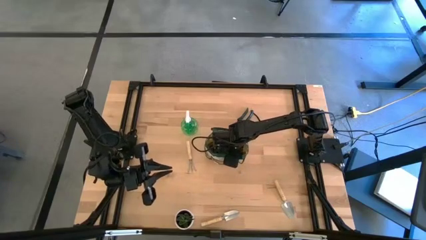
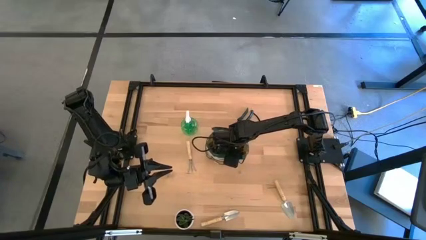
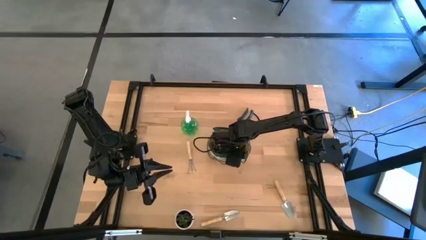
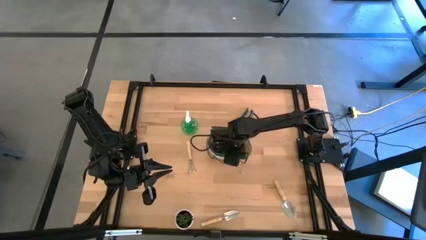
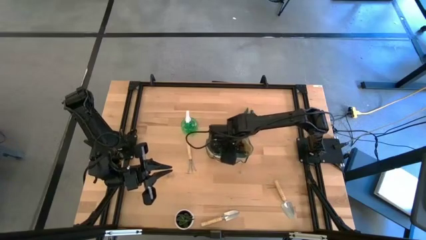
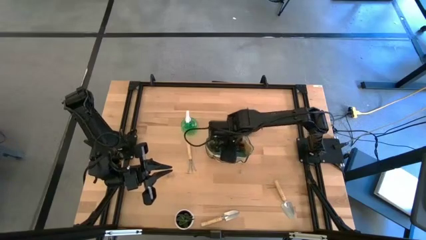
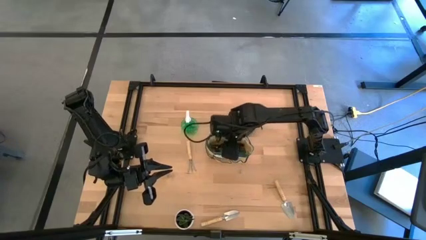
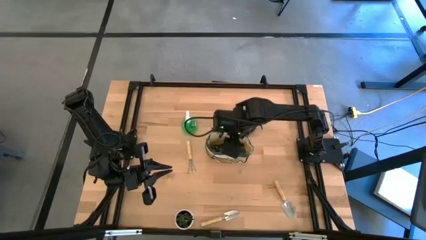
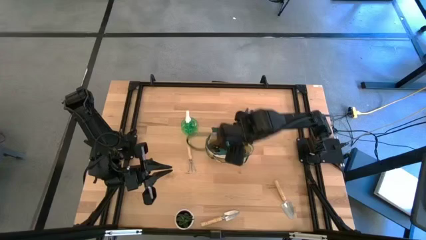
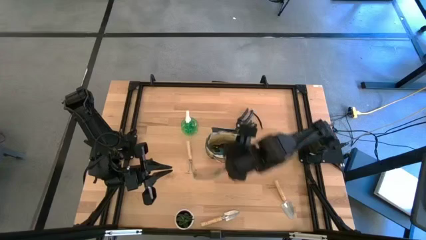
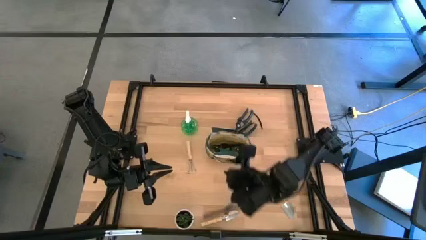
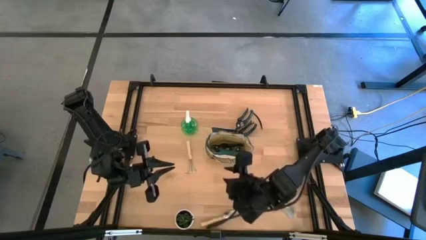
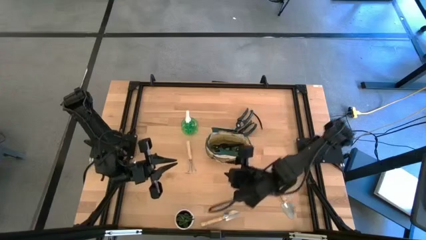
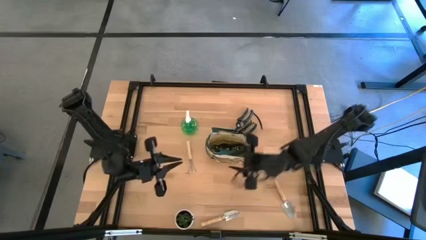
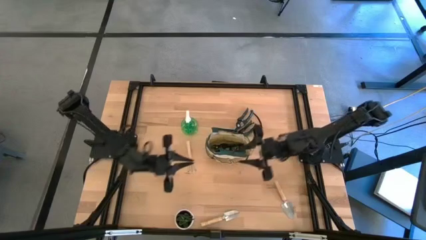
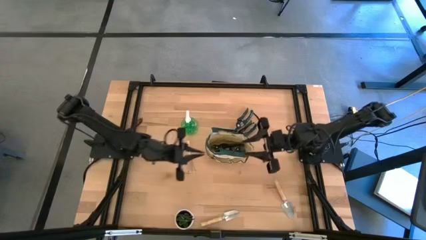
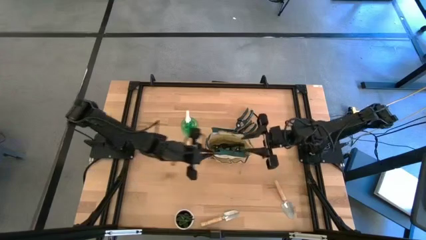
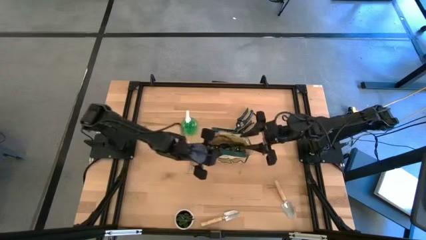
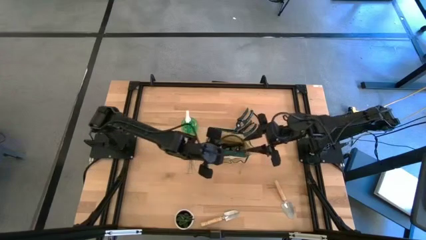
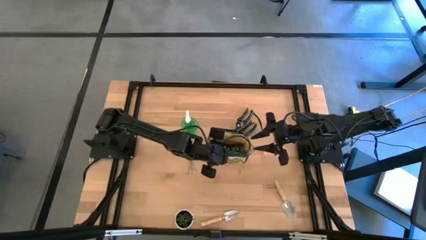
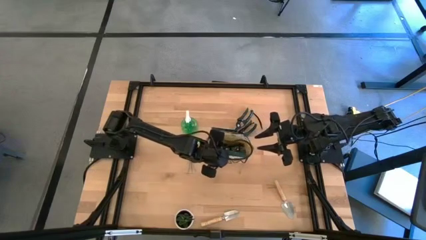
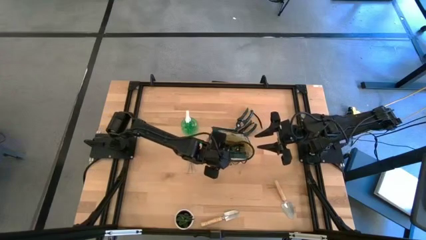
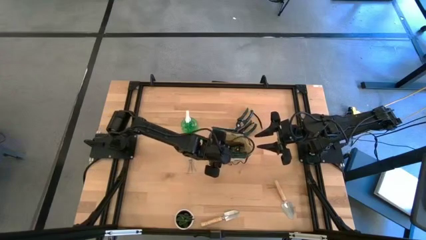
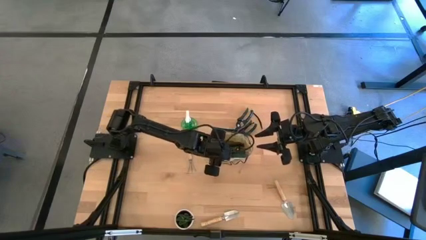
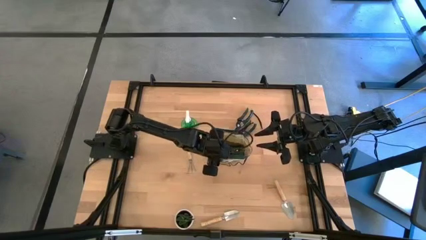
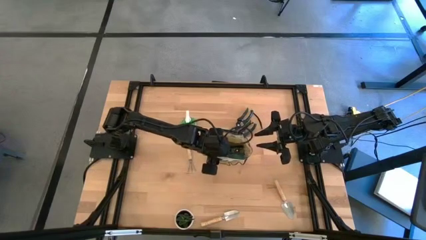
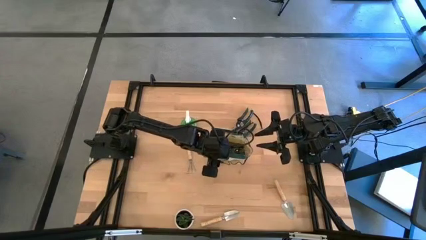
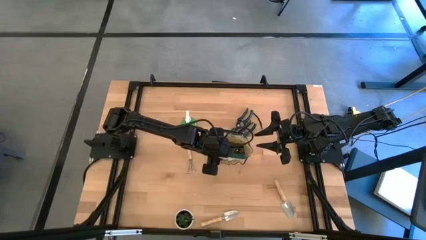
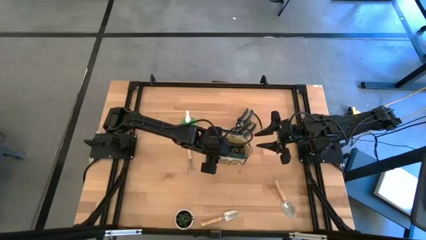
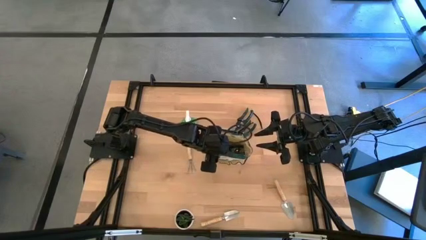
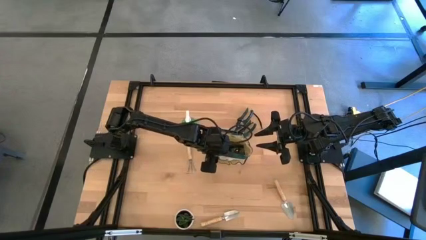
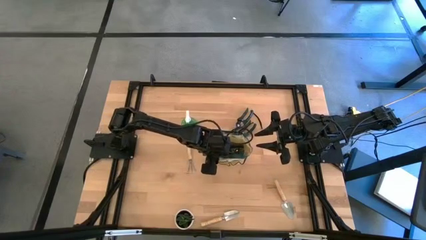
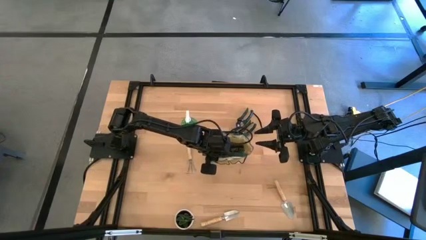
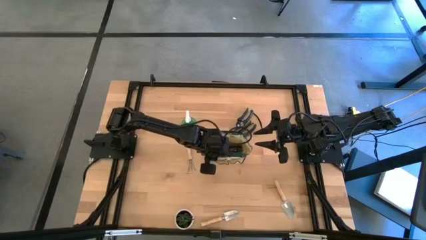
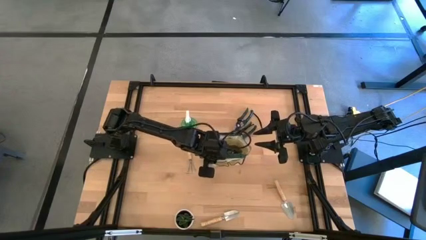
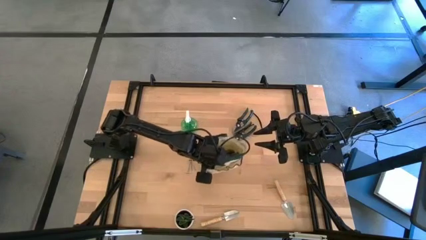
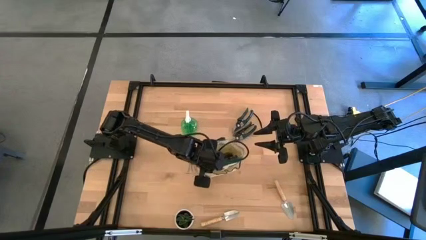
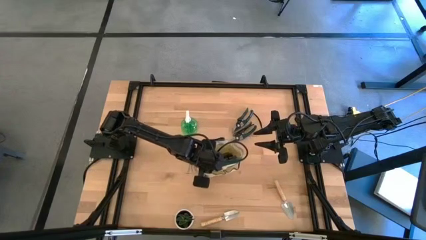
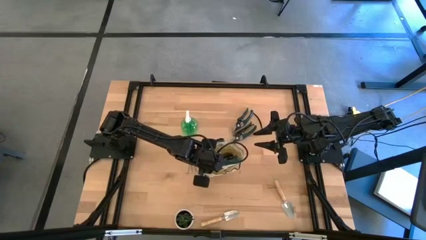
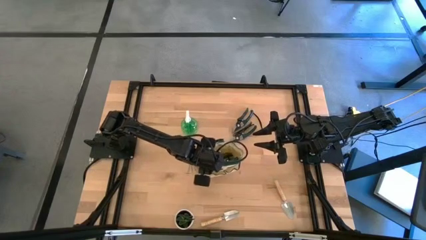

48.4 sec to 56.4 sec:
Task: Pick & Place Garden tools in Gardening bag
Adjust the green gardening bag

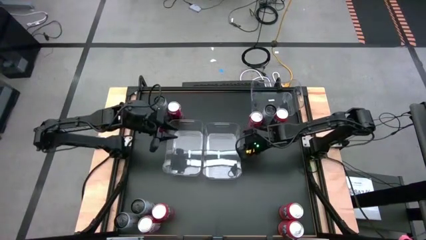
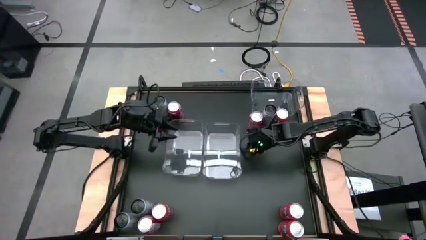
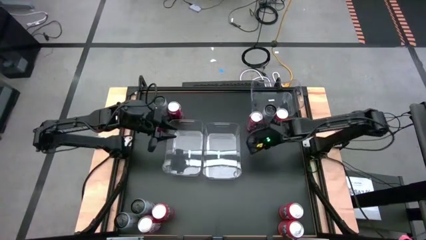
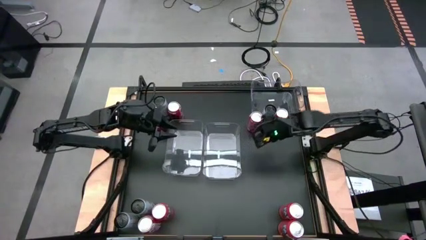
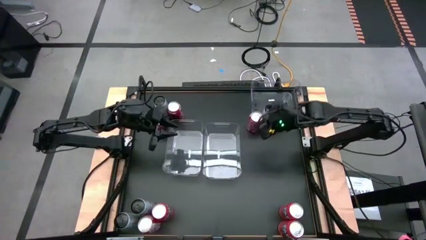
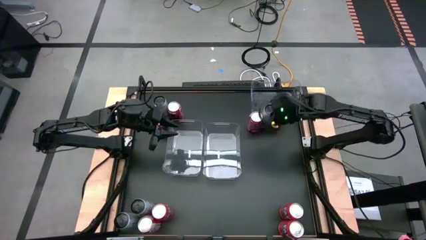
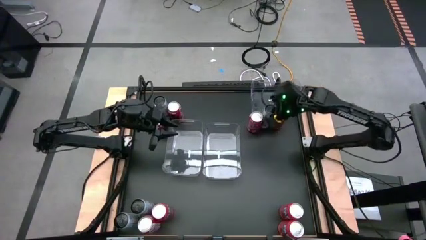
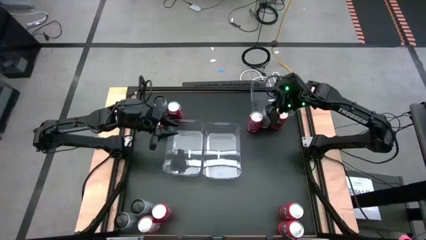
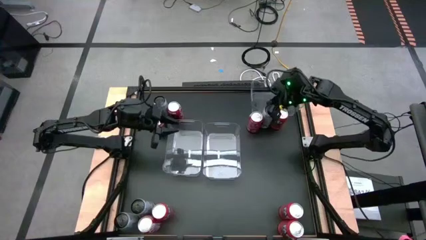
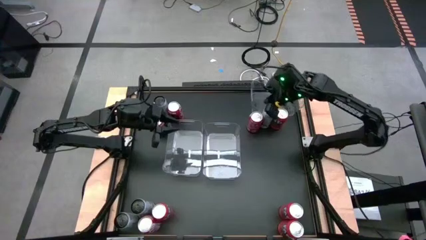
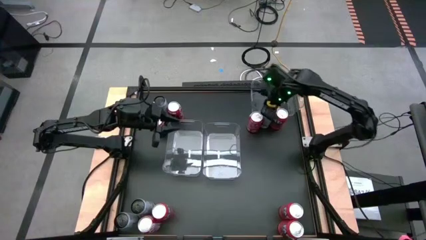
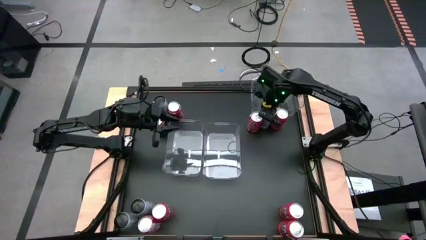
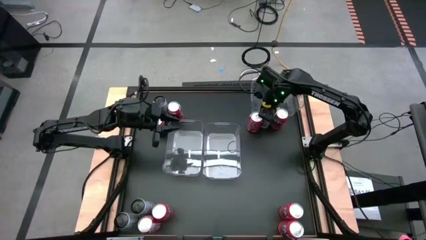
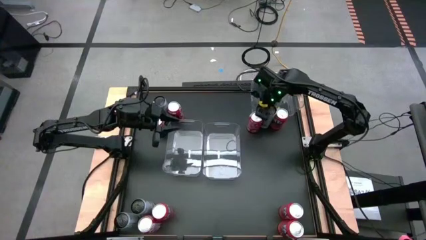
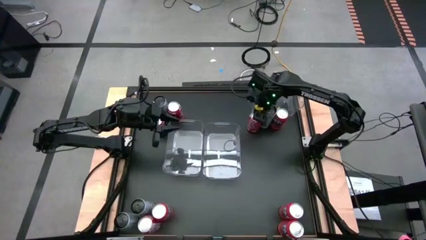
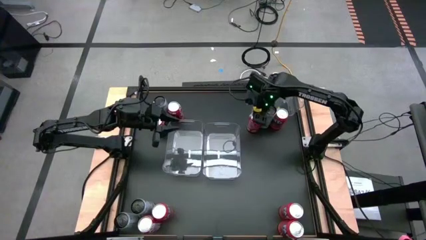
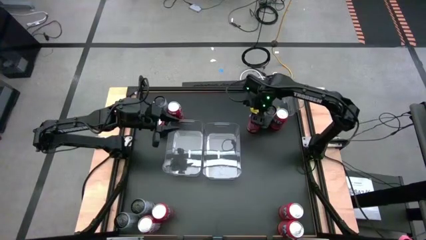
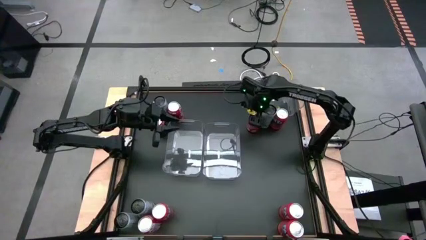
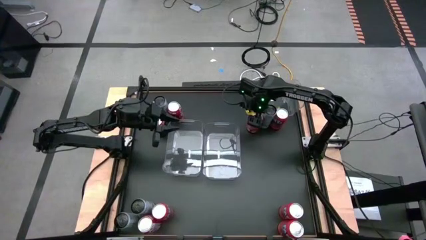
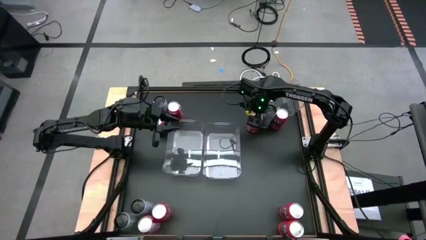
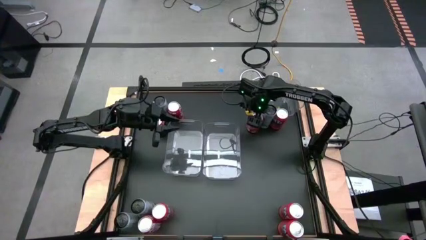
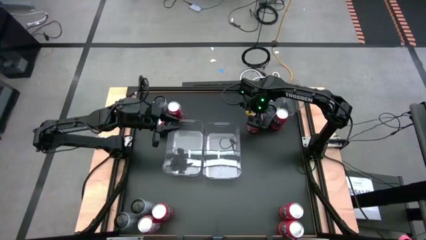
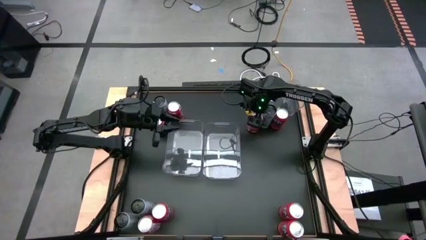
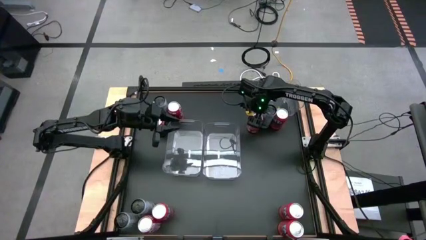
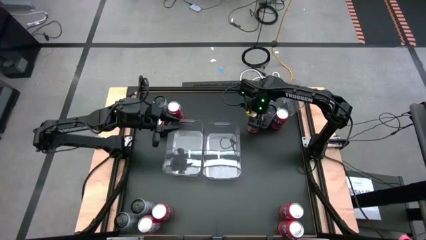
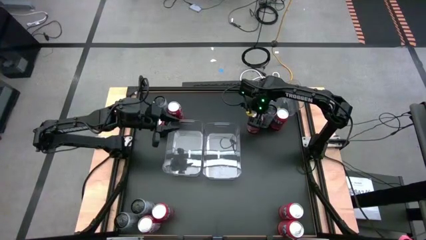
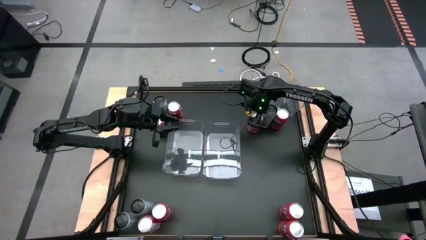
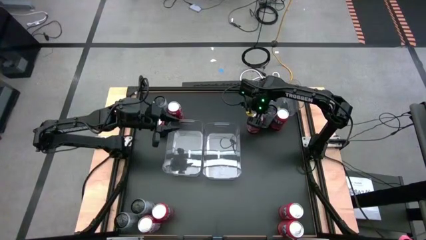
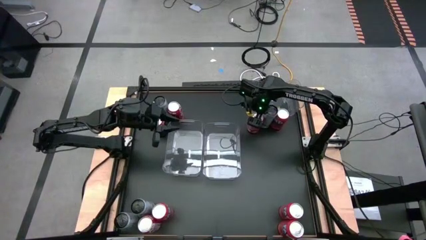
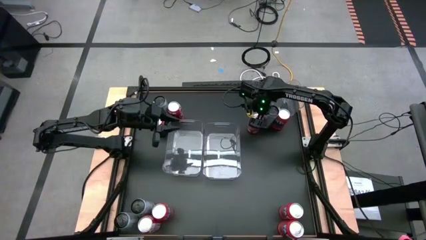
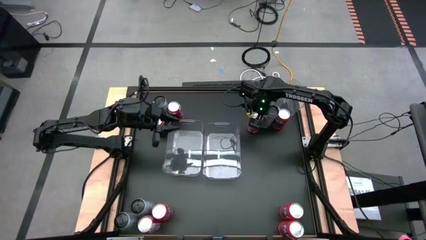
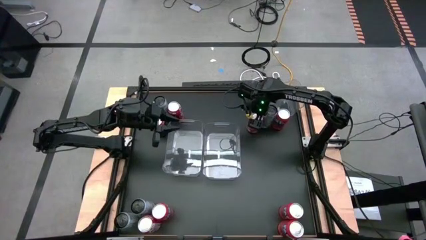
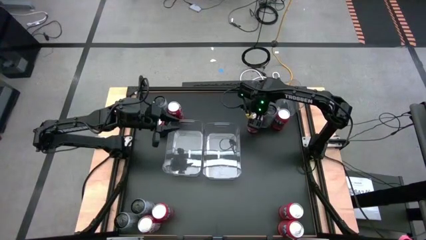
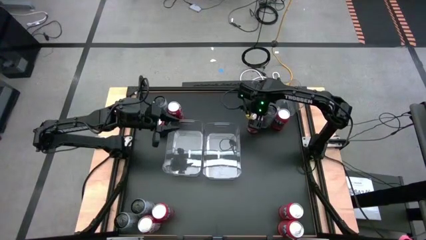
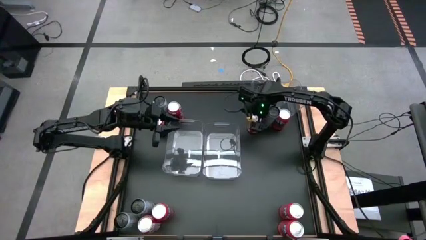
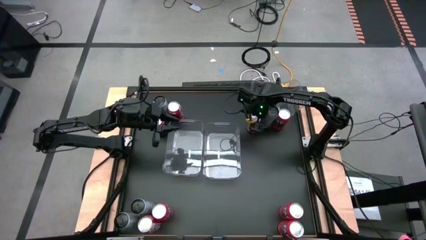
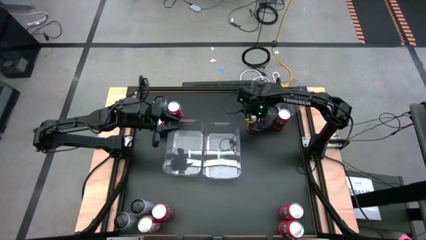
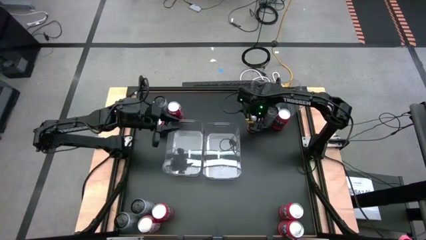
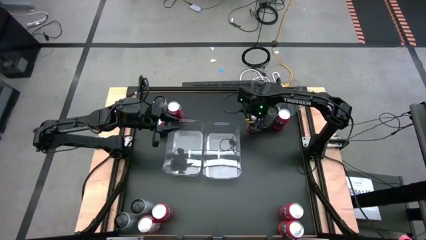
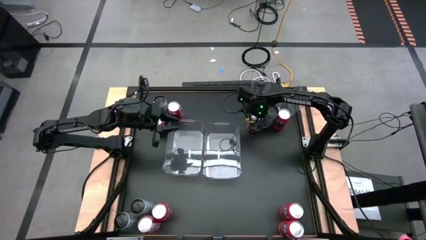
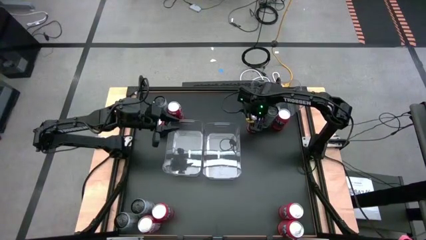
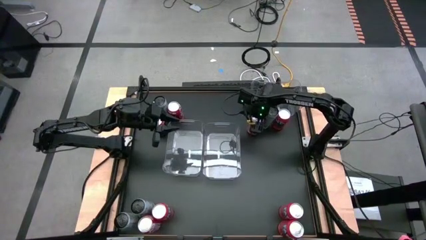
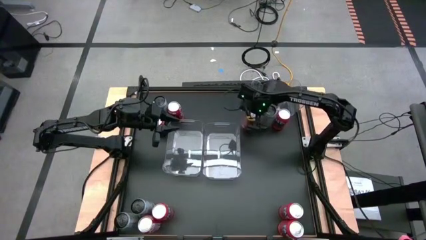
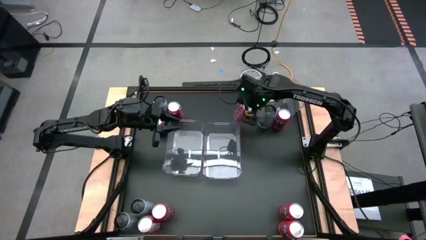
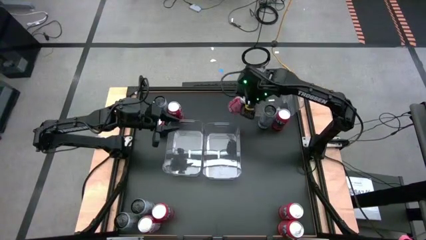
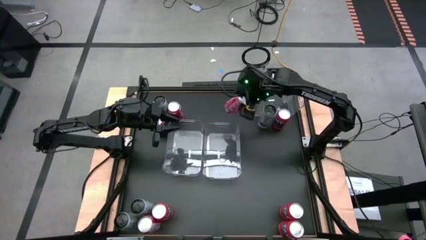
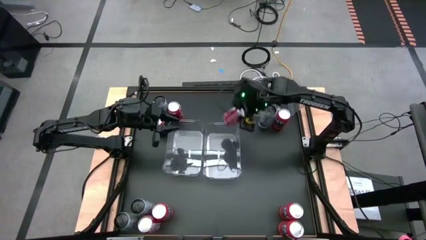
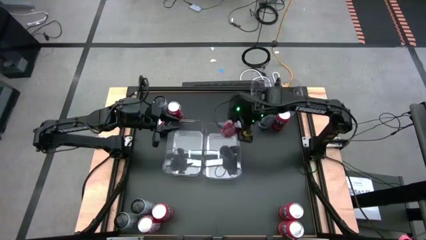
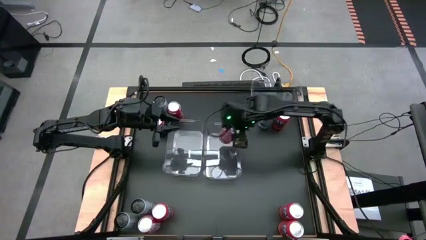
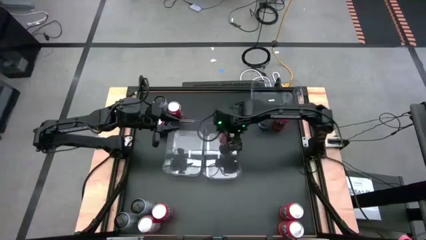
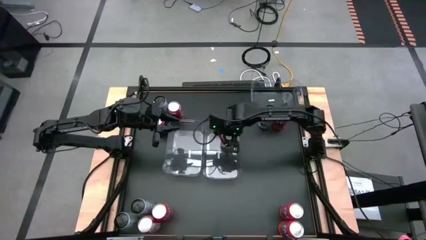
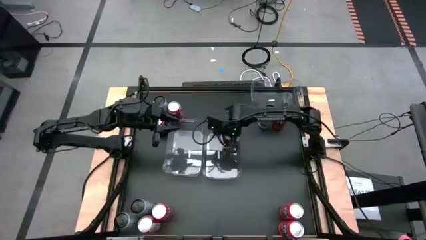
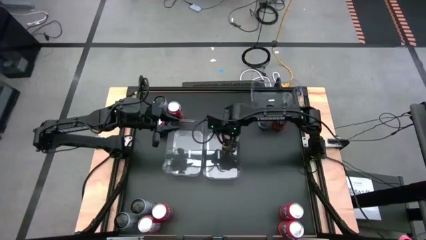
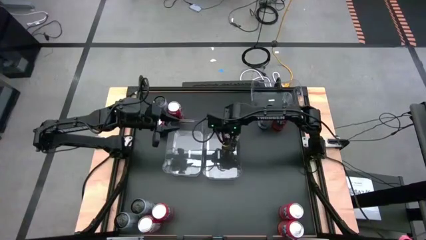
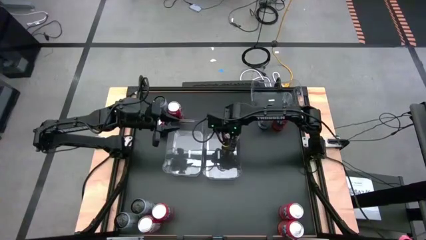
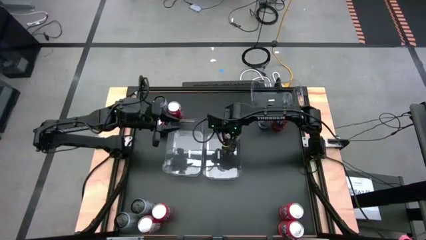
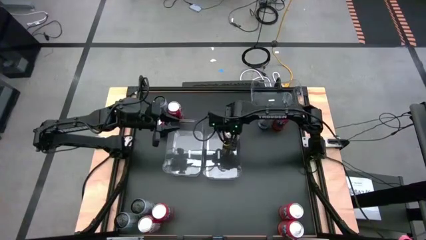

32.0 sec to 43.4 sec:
Task: Sort soda cans
Put the red-white soda can into the bottom right transparent bin
